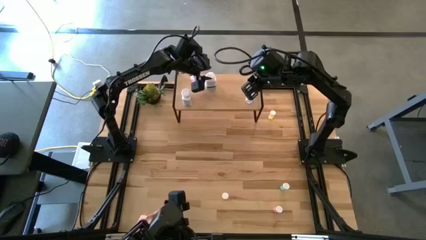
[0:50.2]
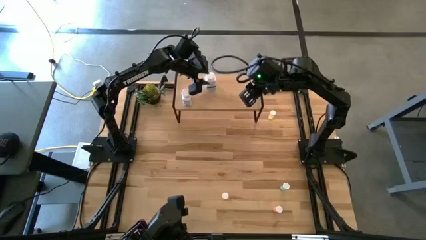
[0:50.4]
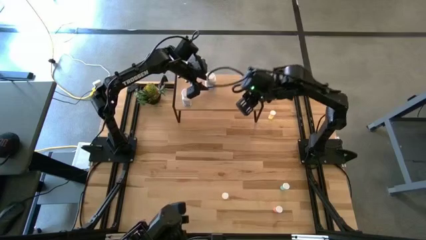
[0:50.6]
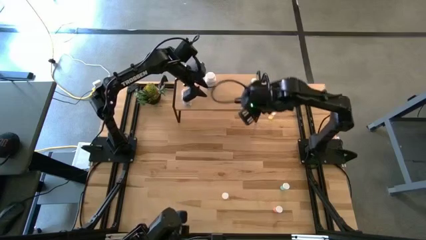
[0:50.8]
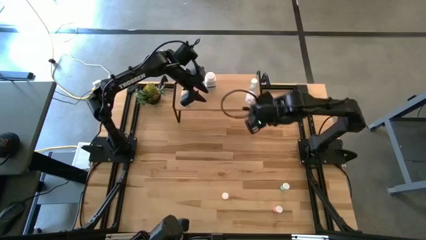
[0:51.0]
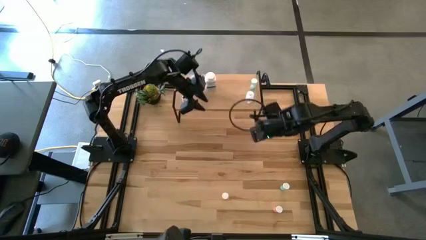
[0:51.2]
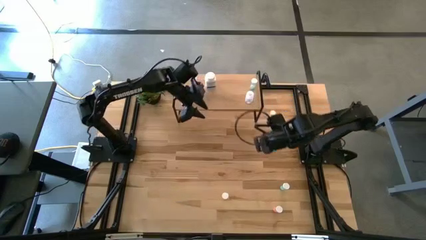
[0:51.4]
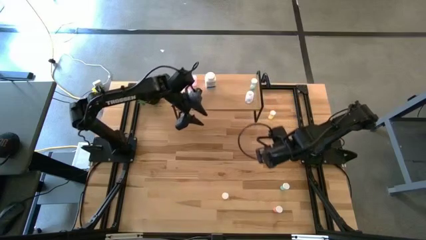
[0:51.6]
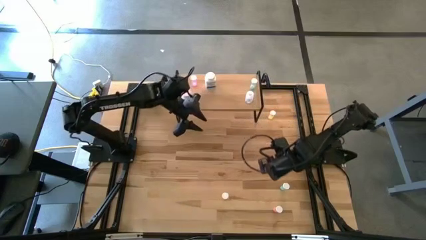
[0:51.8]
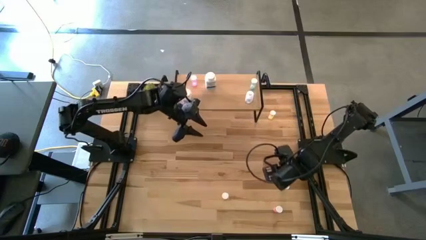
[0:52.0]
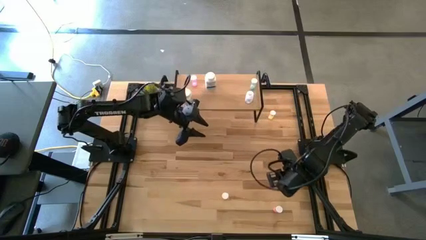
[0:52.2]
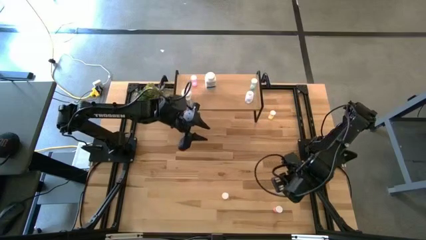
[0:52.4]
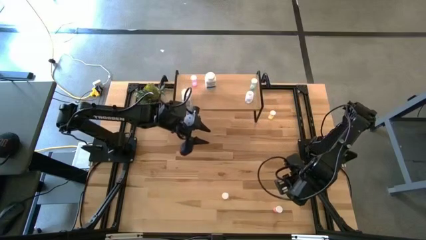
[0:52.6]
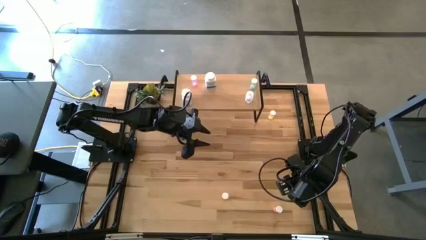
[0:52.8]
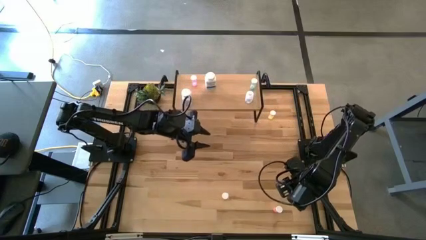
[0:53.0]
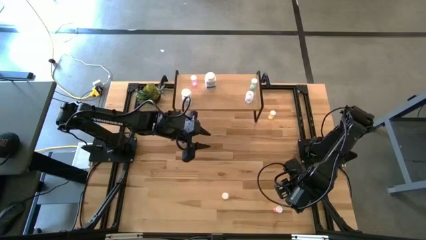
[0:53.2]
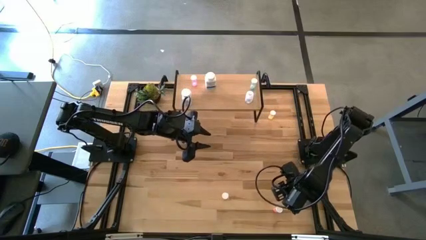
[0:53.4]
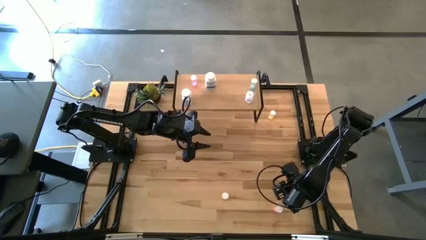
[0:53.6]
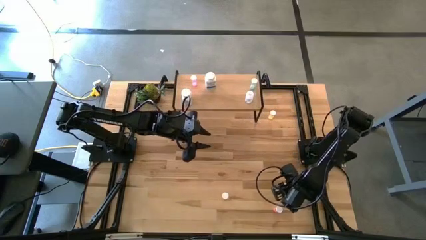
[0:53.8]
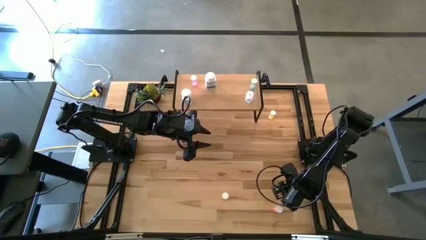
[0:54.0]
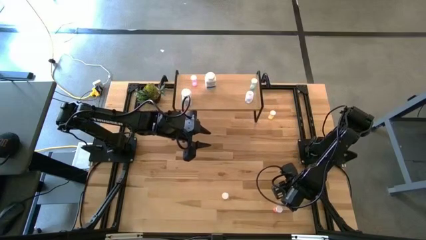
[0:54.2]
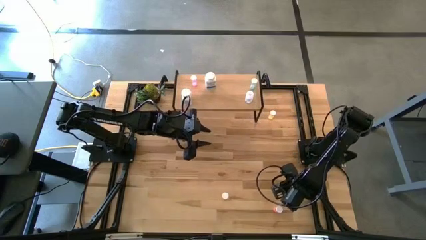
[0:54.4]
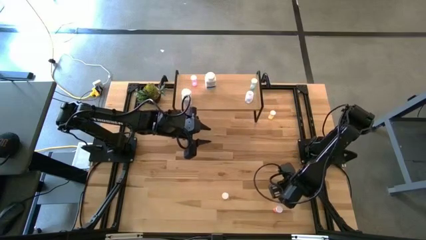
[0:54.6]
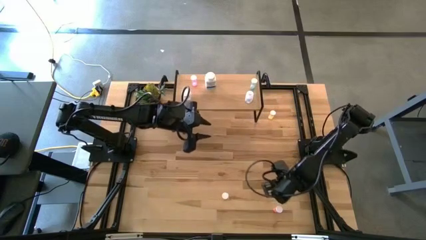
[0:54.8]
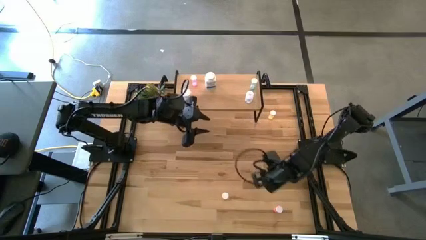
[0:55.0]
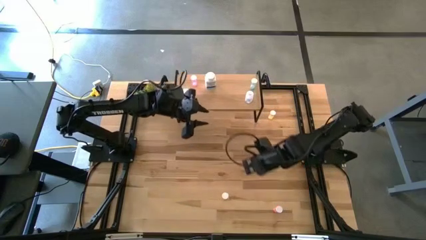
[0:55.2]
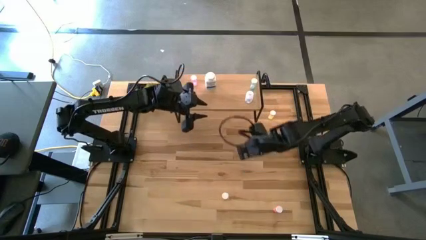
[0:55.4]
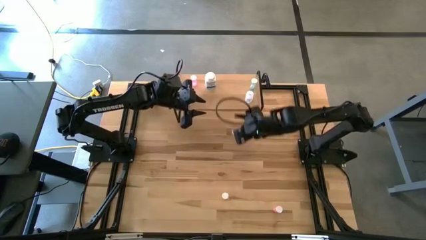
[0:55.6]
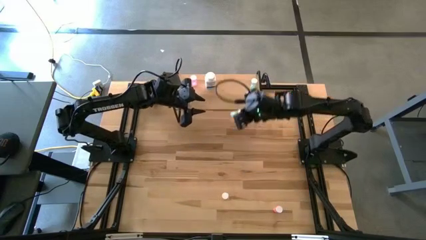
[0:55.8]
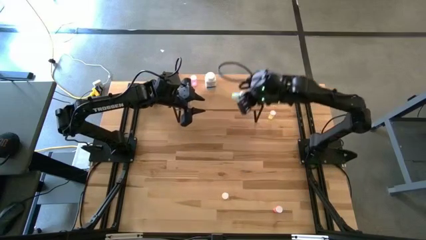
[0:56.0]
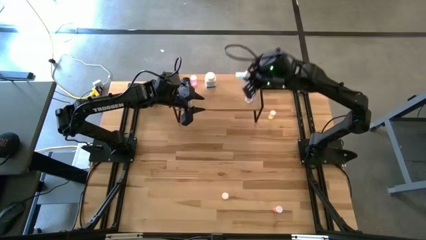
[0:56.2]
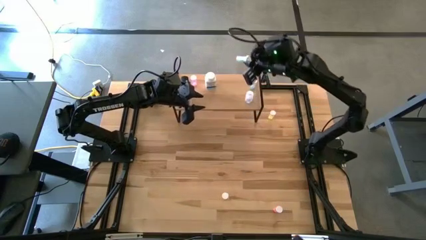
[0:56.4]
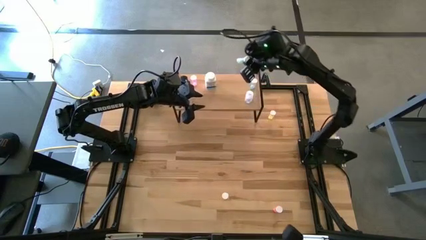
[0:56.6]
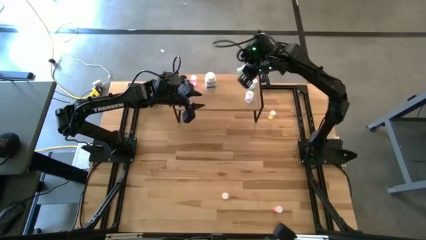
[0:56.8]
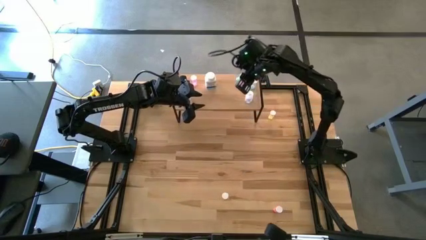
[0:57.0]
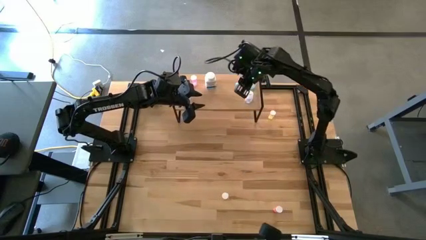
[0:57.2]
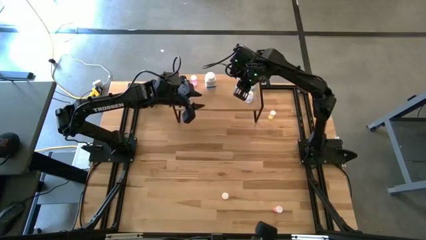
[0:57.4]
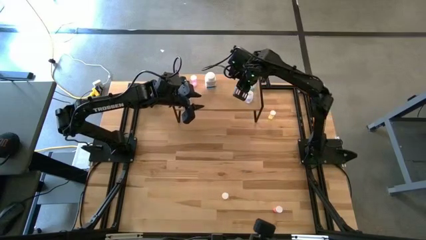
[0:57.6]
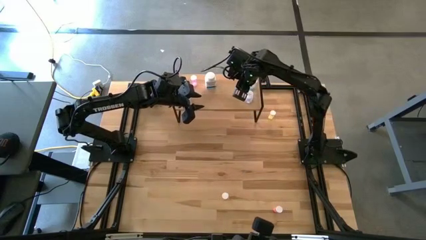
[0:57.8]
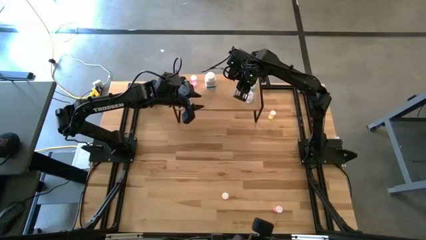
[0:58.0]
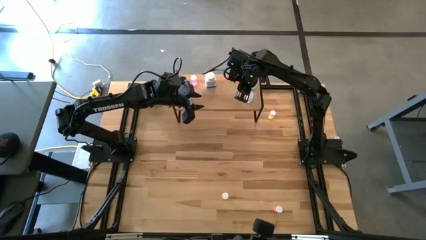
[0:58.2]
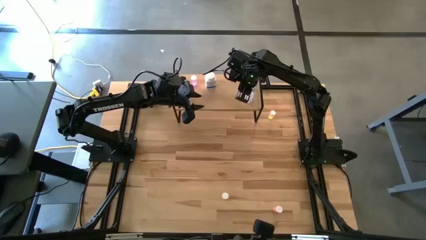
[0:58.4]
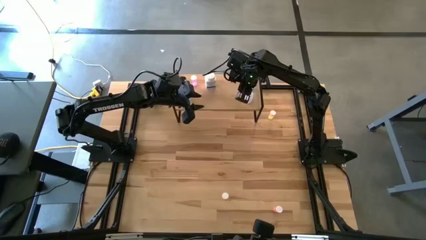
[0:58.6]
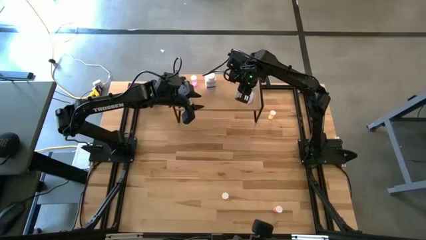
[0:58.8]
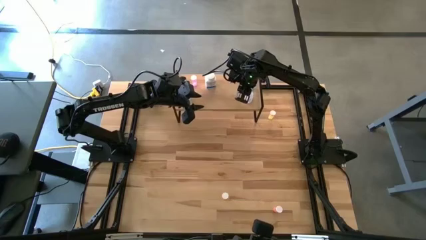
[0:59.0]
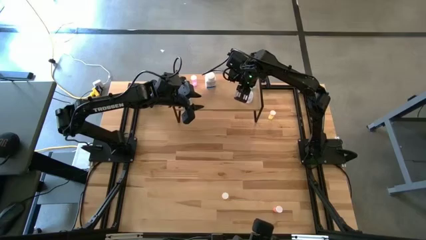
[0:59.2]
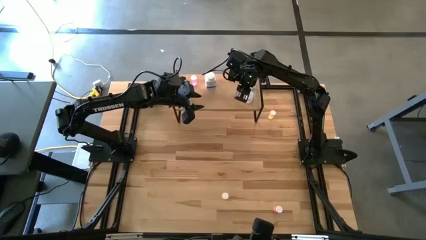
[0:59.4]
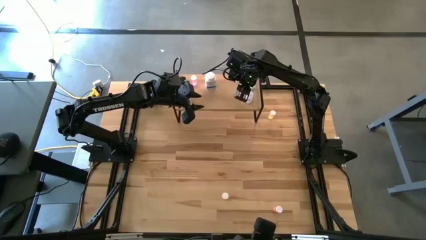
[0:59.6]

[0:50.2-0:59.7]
Task: Pick and place medicine bottles onto shelf by color
Put the blue pill bottle on the shelf

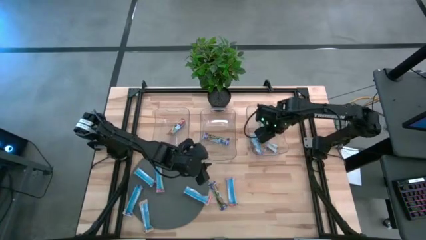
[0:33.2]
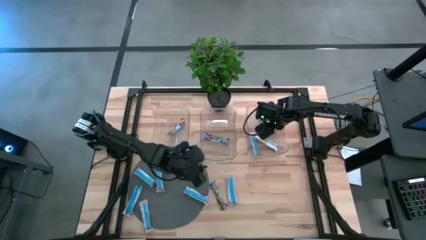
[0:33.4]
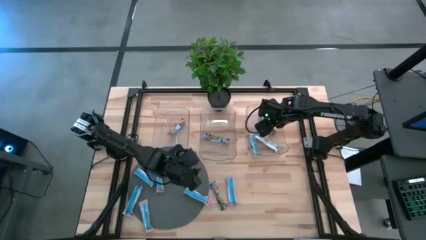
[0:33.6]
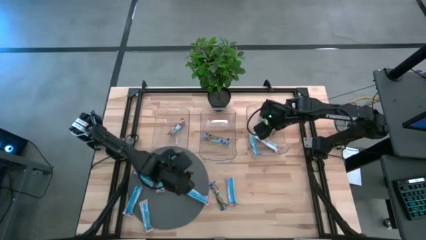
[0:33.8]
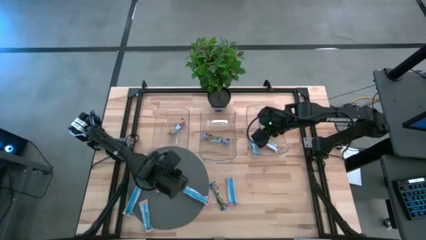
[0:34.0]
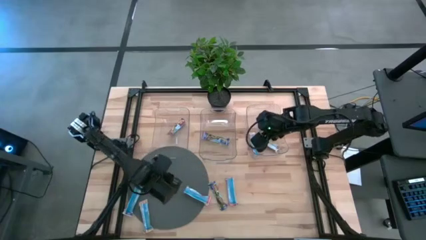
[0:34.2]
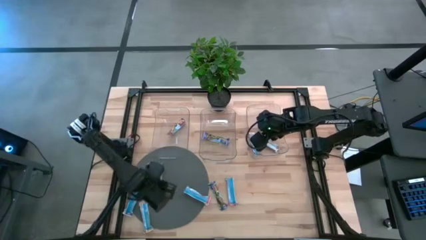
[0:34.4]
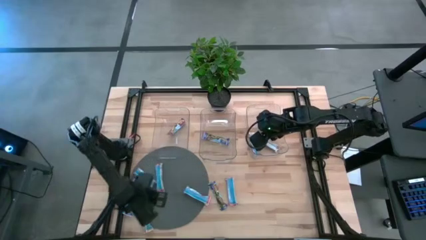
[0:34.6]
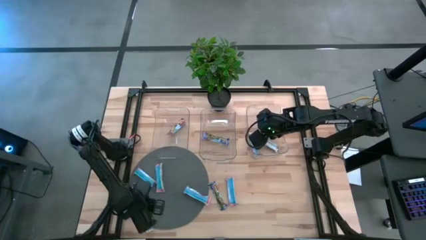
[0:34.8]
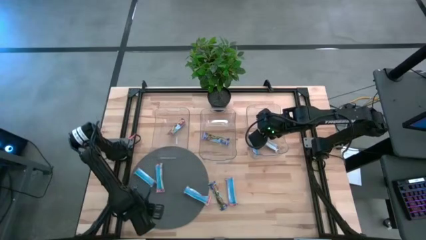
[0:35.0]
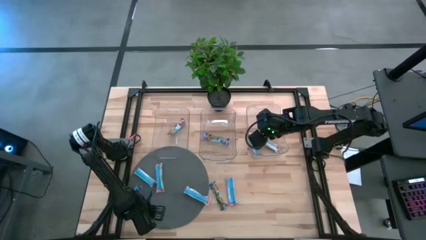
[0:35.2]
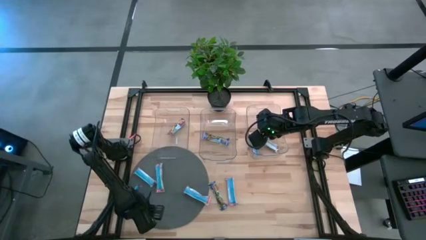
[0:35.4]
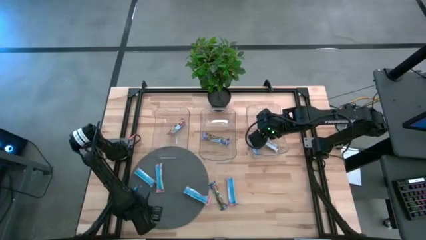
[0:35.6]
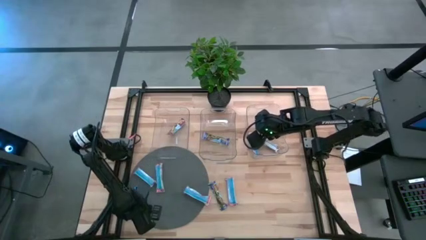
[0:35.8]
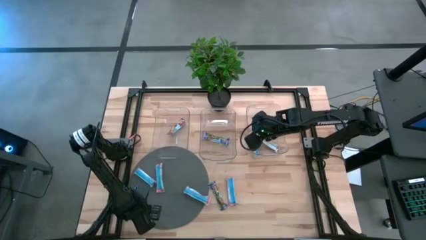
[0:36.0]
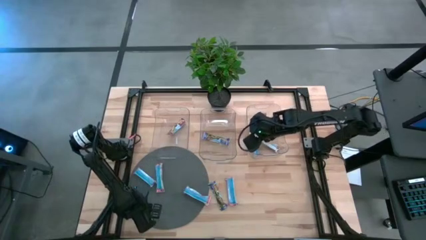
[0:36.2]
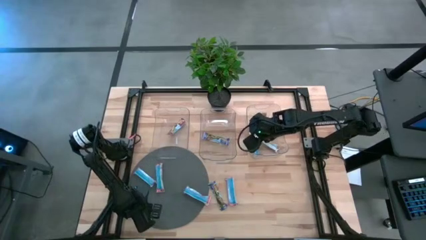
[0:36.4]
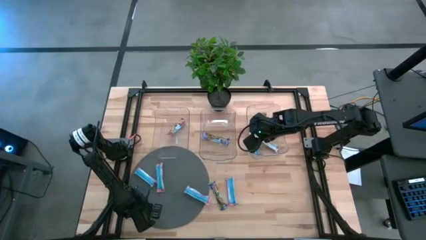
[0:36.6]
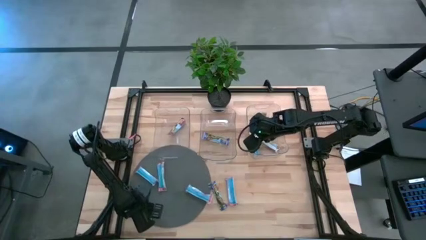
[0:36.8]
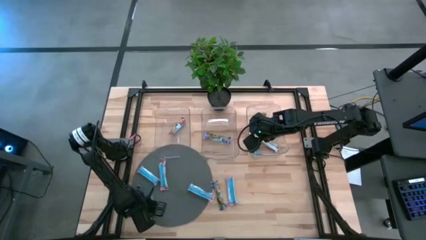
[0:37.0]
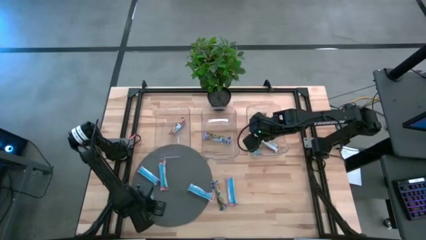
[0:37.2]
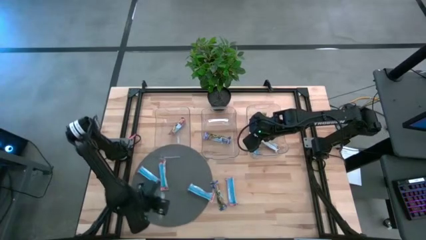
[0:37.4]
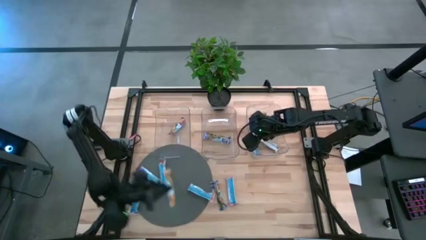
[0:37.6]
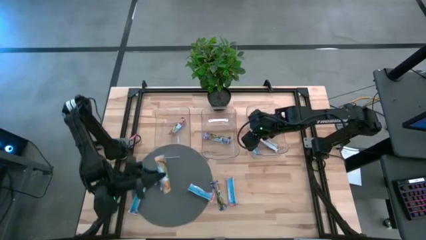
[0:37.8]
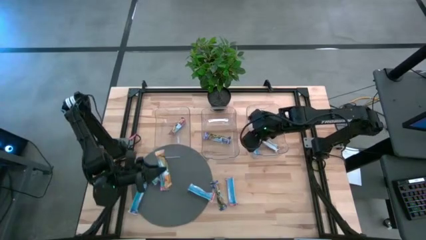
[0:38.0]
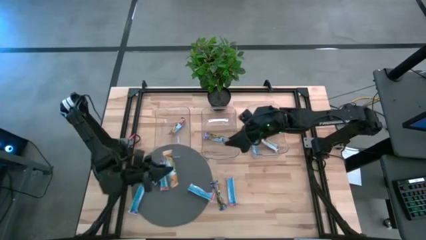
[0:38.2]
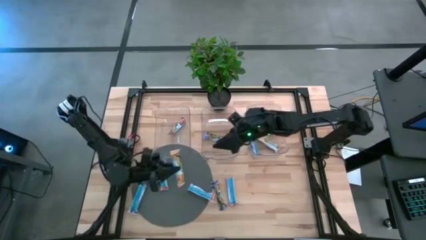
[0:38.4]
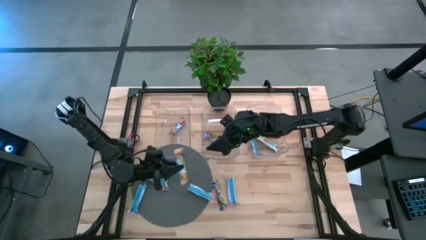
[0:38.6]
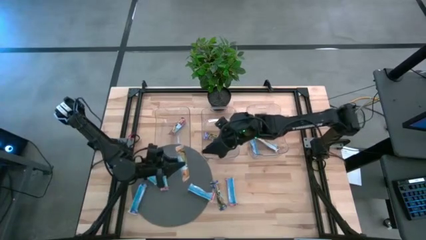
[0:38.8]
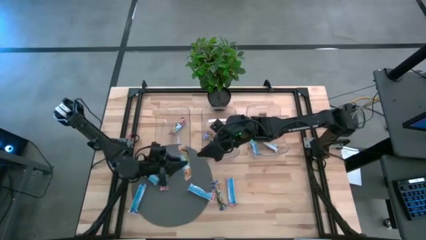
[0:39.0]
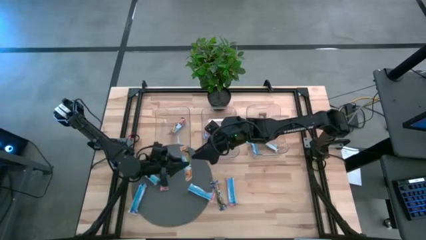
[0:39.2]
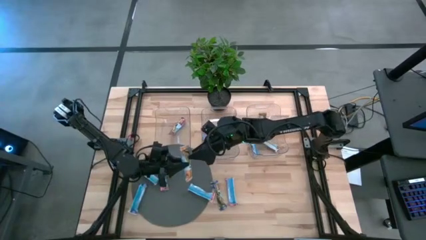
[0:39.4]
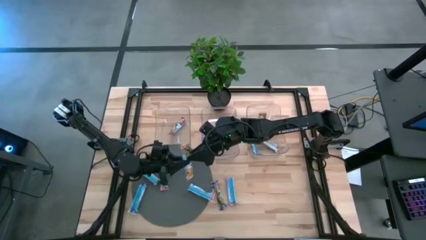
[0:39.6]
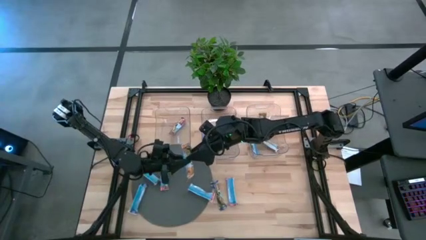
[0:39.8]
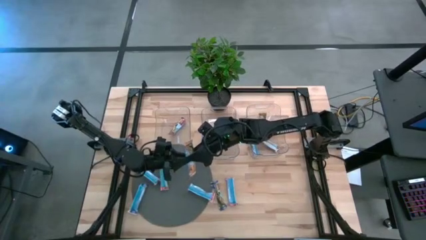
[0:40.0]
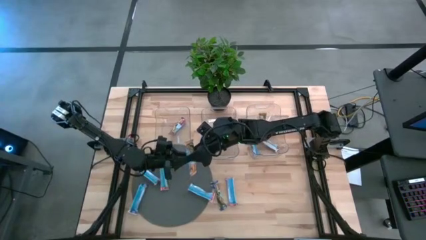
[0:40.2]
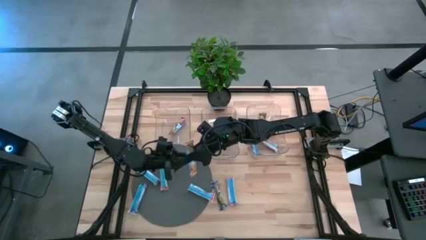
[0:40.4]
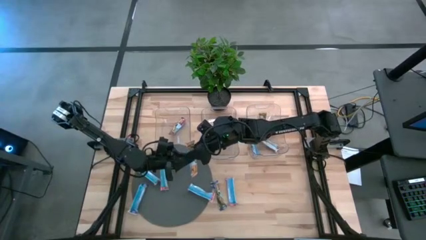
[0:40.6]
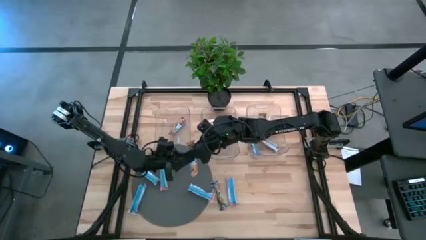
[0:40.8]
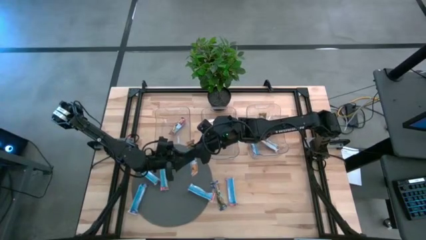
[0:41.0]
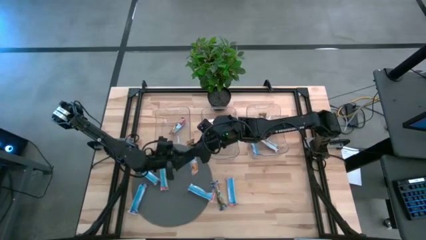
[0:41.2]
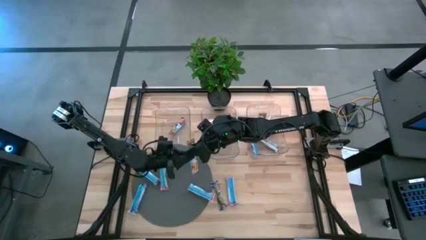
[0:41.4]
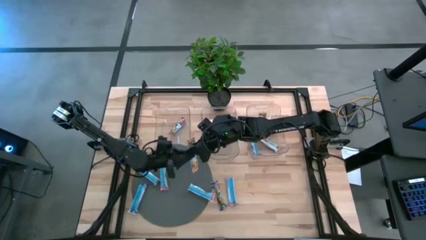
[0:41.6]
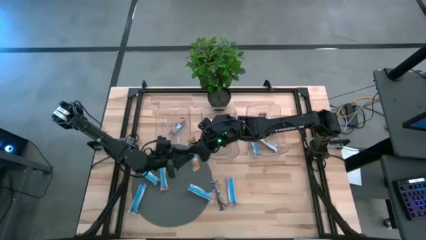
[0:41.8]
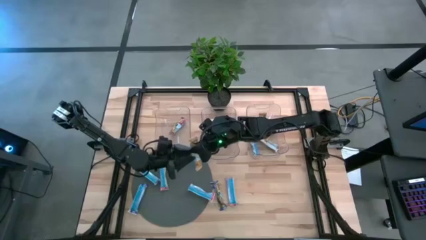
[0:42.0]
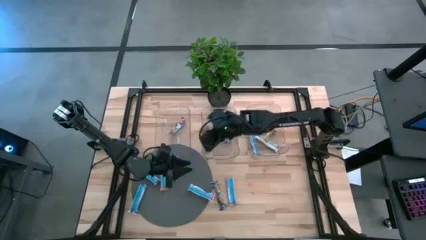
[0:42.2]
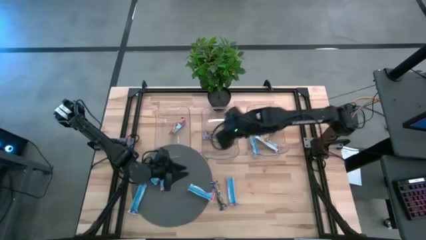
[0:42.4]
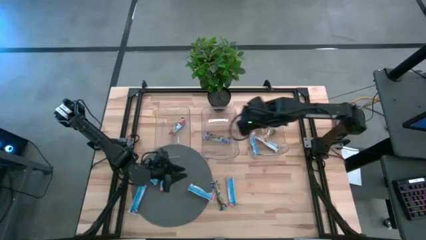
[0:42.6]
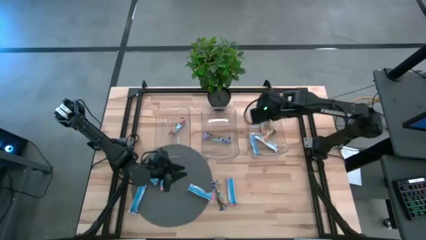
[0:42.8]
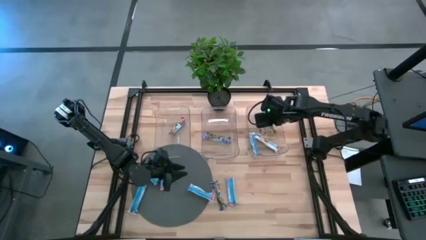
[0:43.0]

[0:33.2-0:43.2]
Task: Pick and place Granola Bars by type
Put the yellow granola bar into the right transparent bin
